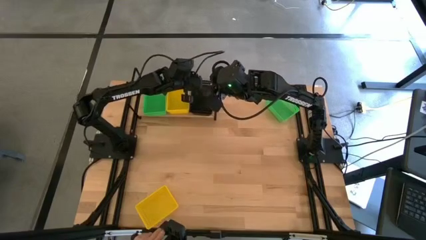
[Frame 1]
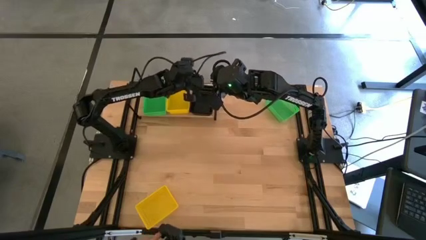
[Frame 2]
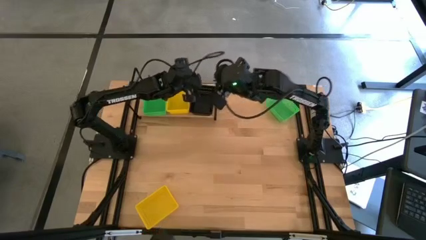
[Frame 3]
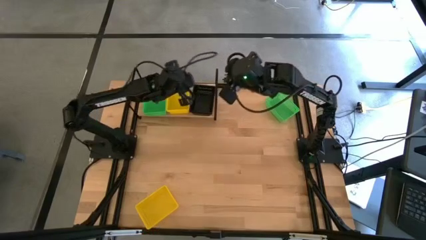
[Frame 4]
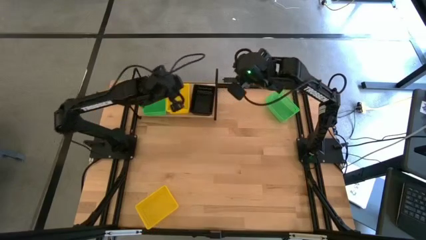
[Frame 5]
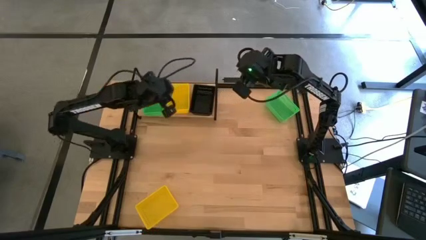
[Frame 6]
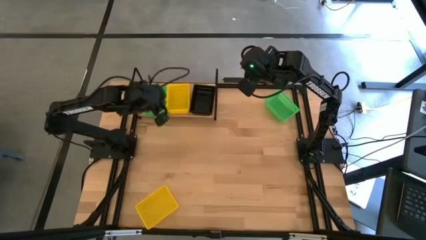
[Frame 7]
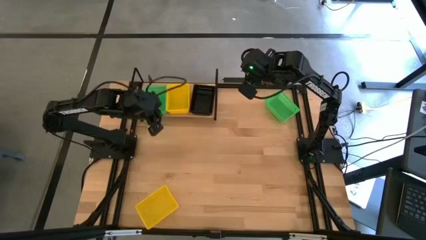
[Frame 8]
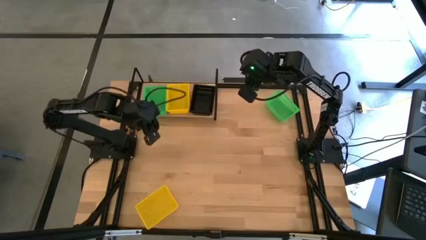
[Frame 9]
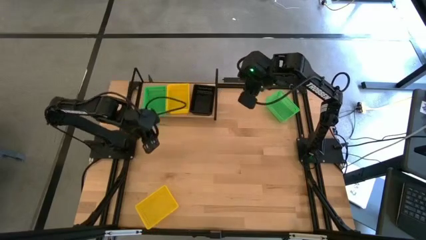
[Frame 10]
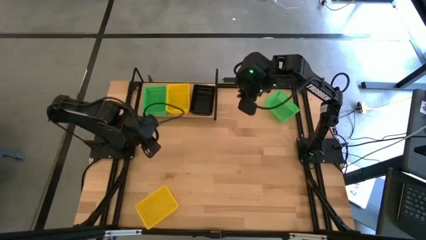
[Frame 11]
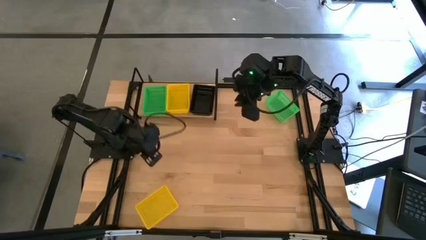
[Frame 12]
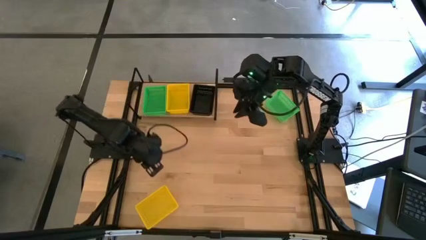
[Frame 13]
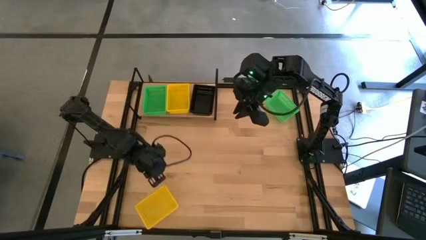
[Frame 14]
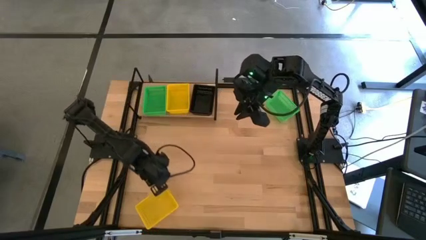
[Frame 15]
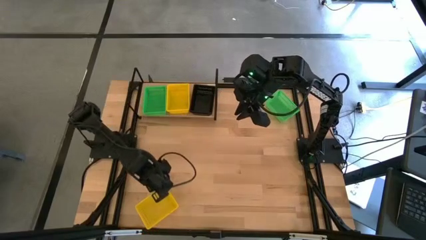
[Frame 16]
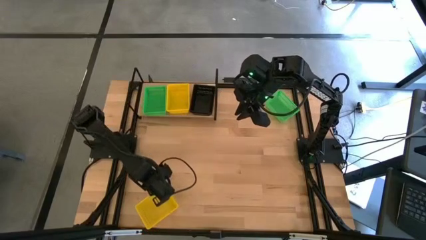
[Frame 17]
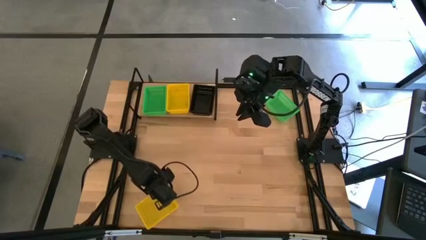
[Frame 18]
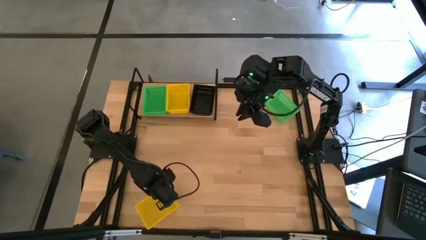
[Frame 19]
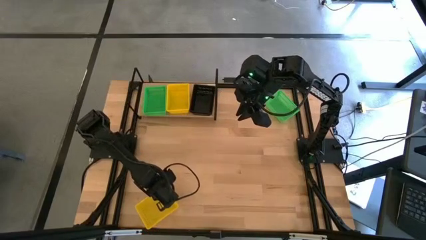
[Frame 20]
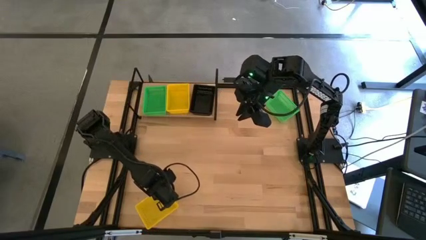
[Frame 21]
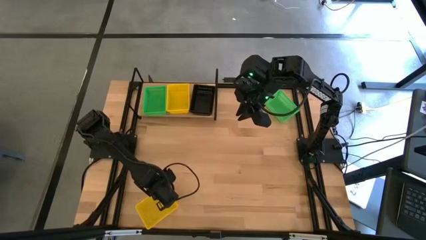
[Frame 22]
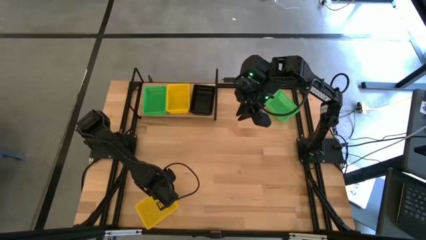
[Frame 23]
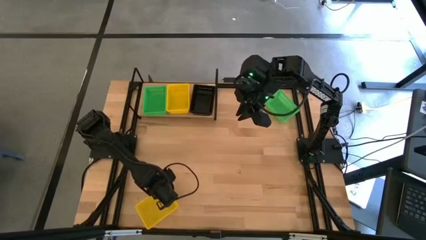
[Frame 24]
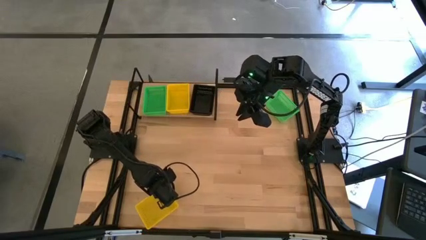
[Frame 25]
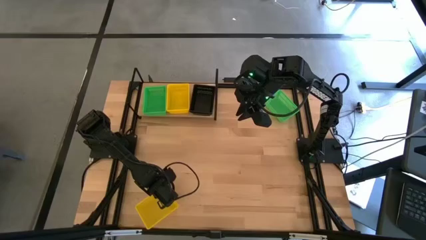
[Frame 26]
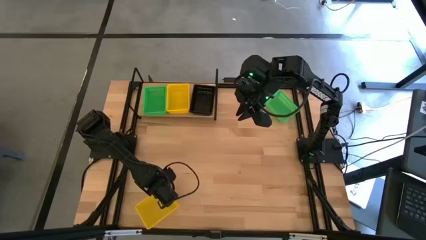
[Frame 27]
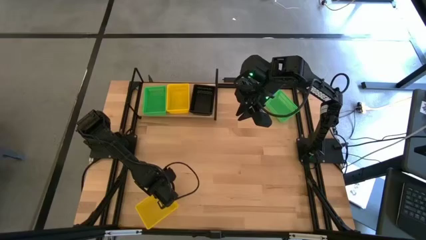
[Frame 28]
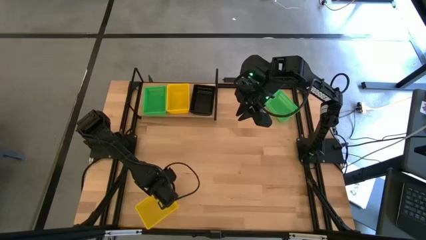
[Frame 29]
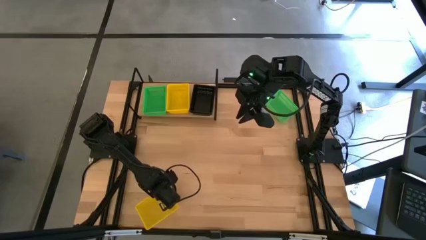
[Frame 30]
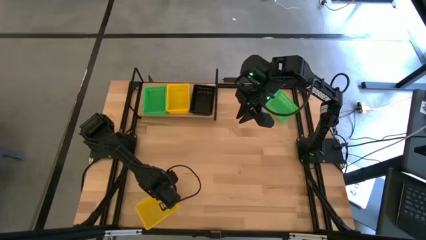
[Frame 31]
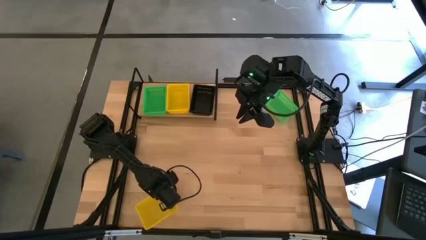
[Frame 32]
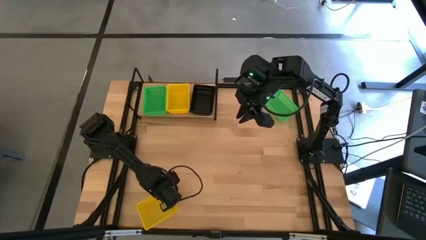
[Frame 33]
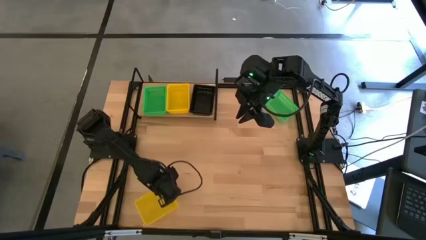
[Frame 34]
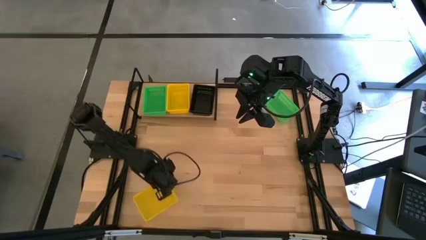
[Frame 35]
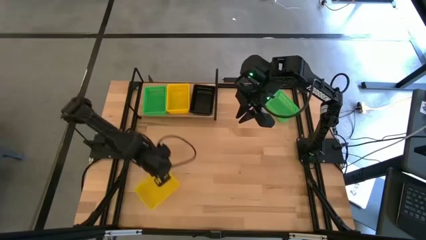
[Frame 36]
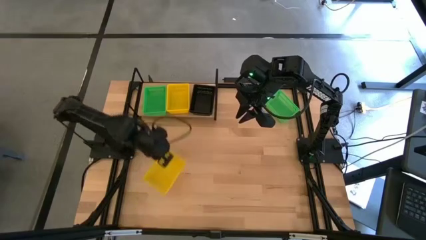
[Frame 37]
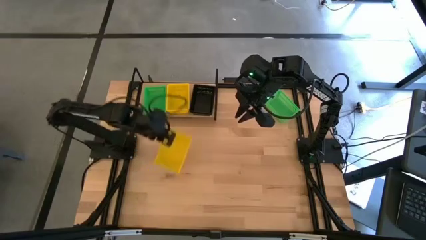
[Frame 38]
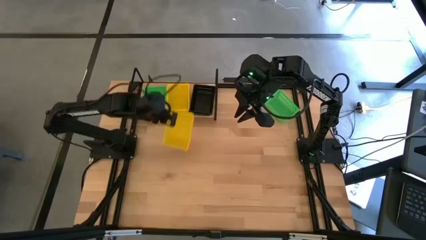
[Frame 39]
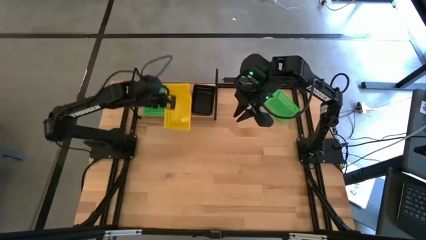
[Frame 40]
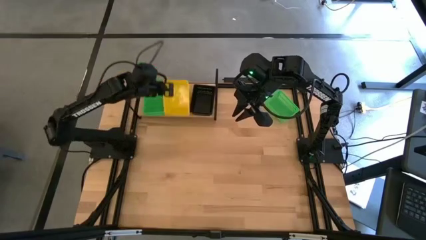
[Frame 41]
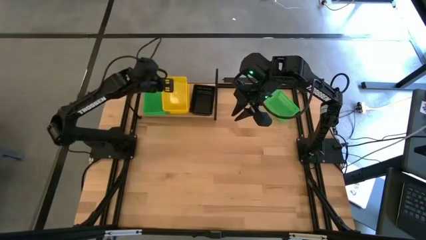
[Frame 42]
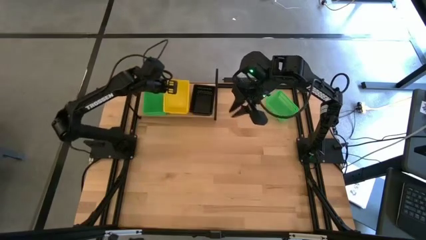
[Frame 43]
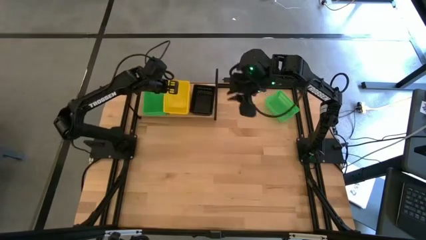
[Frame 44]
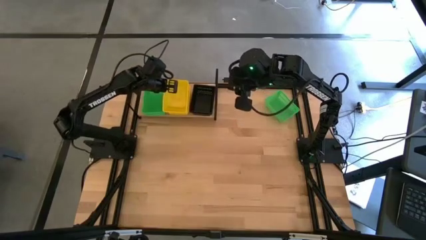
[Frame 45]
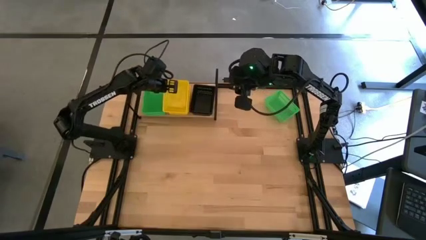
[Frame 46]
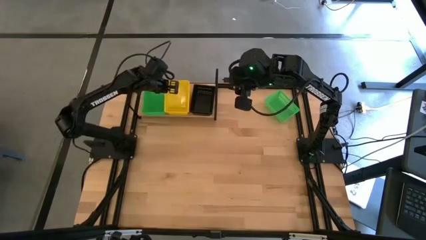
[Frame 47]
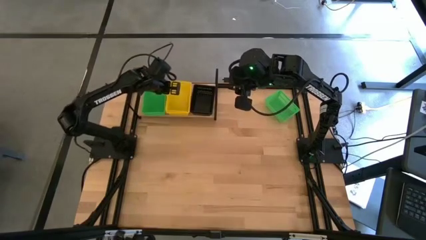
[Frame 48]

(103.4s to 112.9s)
Task: Stack baskets on shelf by color
Stack the yellow basket on the yellow basket on the shelf

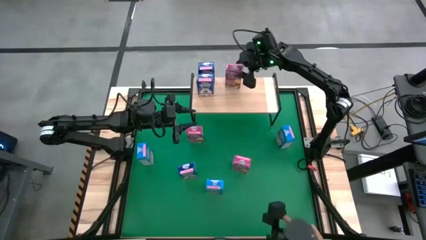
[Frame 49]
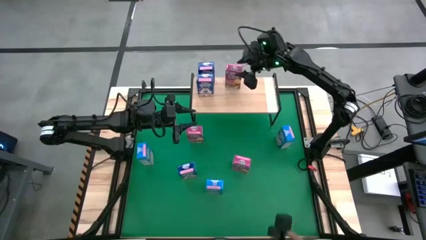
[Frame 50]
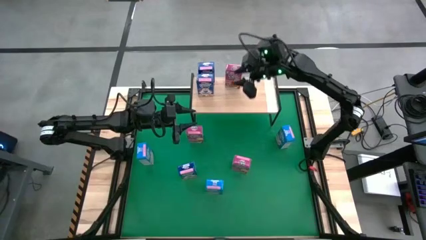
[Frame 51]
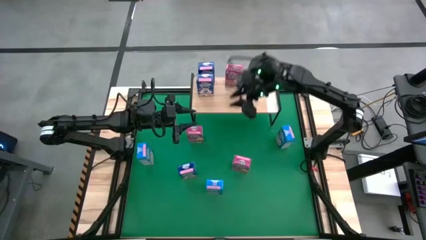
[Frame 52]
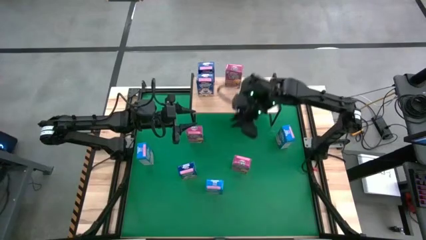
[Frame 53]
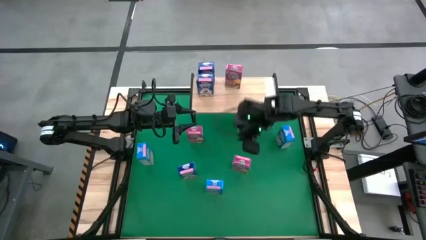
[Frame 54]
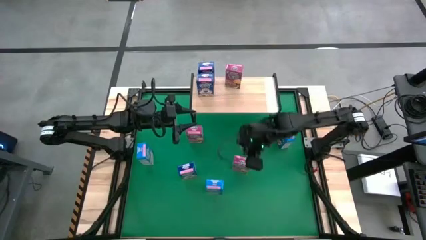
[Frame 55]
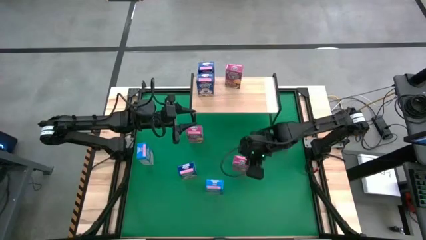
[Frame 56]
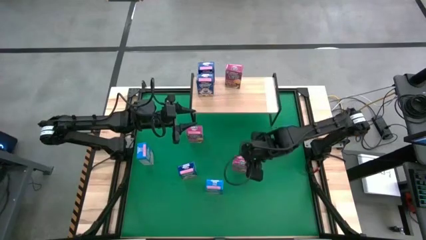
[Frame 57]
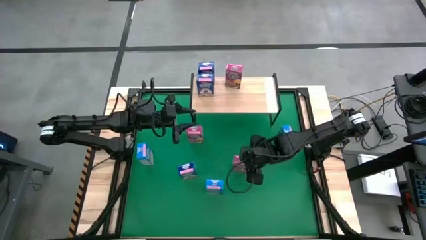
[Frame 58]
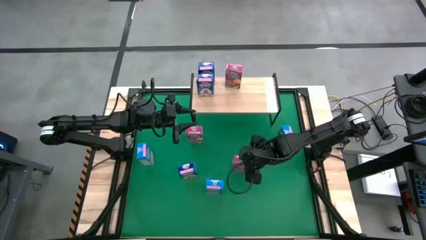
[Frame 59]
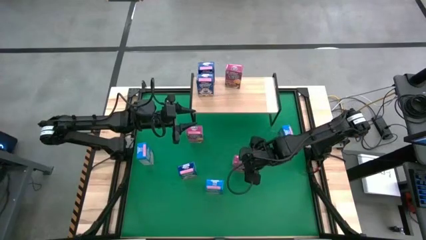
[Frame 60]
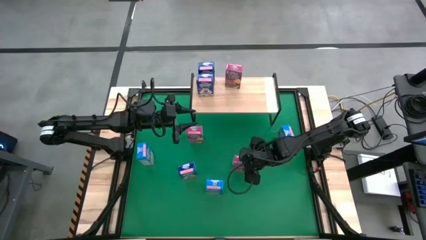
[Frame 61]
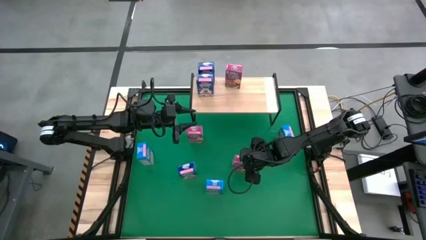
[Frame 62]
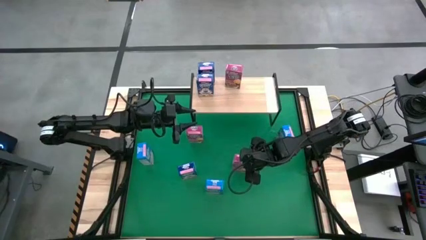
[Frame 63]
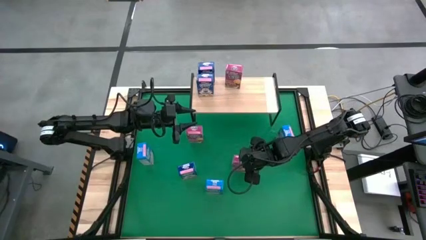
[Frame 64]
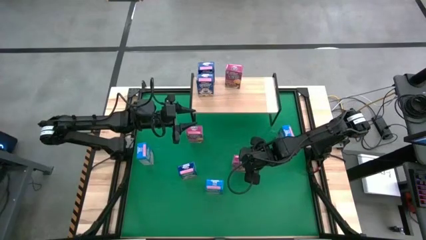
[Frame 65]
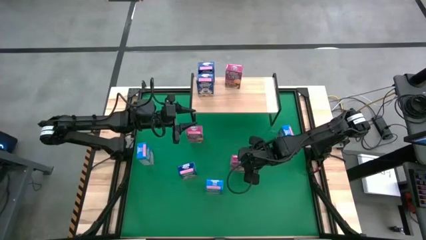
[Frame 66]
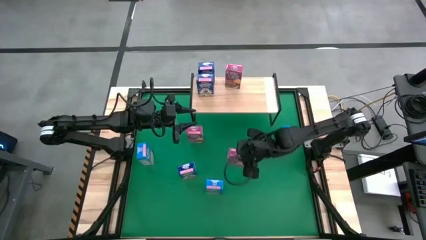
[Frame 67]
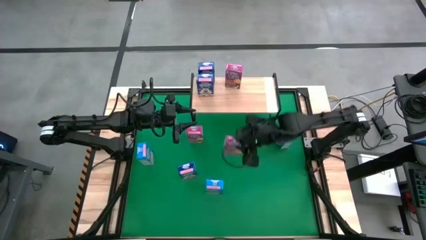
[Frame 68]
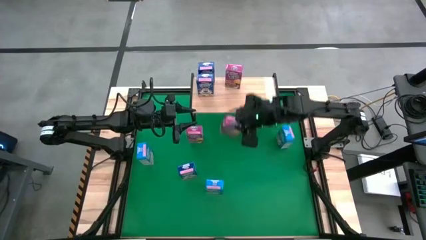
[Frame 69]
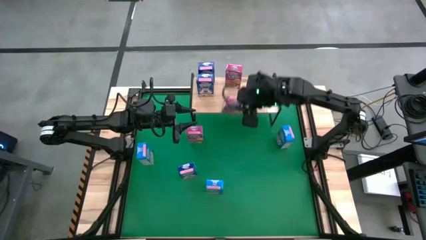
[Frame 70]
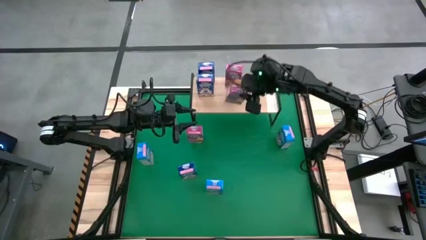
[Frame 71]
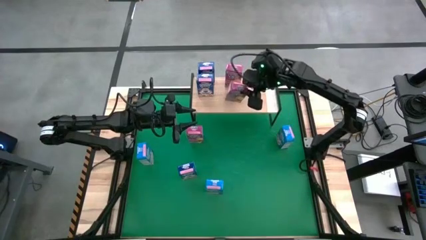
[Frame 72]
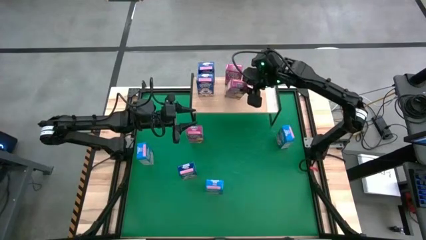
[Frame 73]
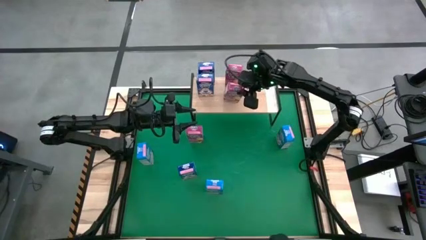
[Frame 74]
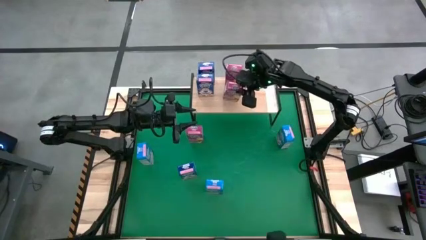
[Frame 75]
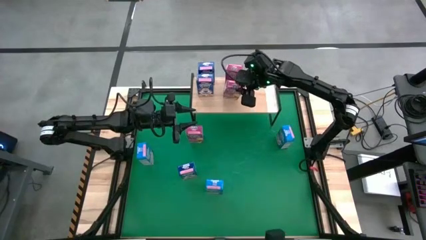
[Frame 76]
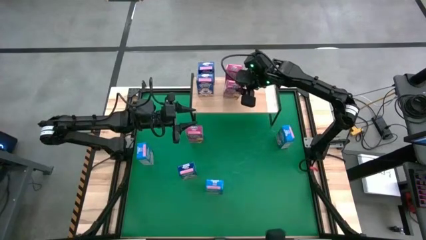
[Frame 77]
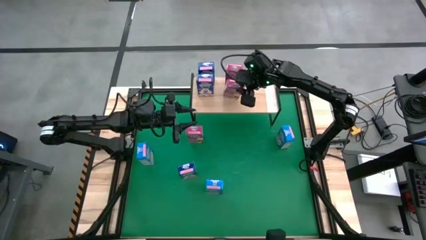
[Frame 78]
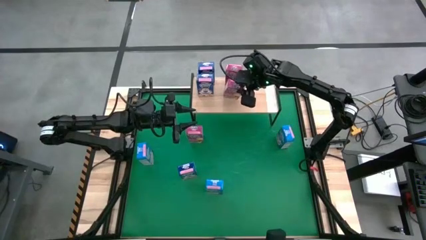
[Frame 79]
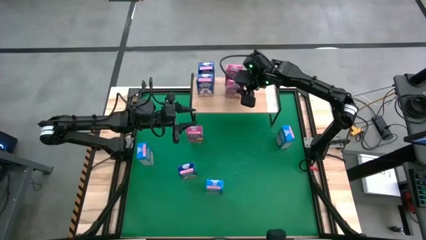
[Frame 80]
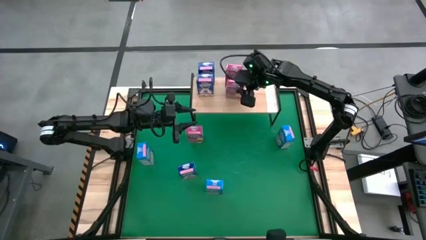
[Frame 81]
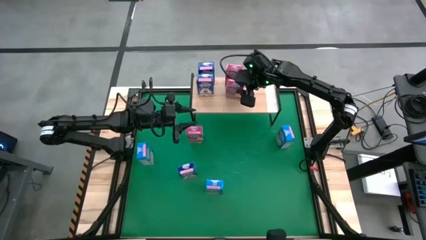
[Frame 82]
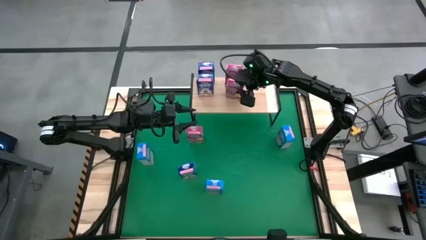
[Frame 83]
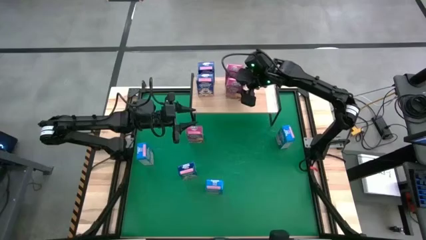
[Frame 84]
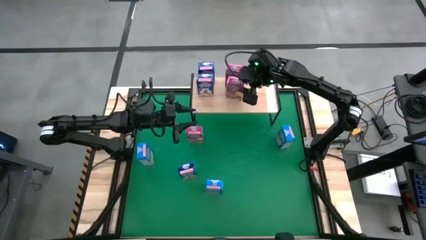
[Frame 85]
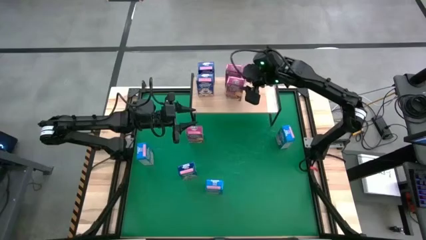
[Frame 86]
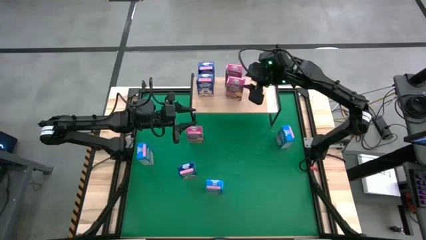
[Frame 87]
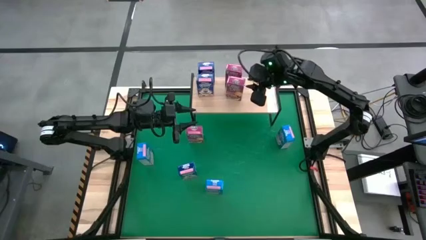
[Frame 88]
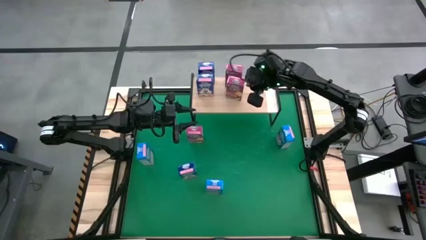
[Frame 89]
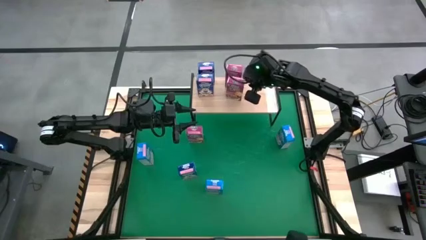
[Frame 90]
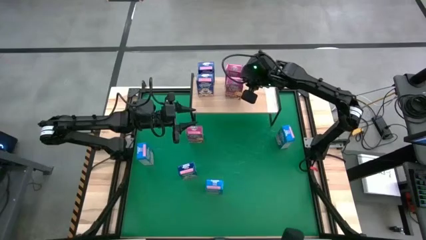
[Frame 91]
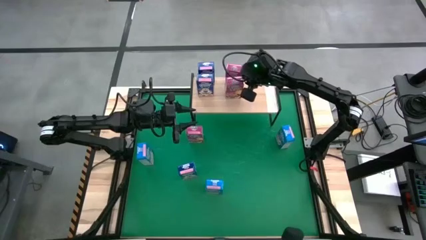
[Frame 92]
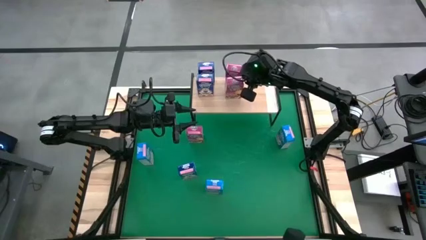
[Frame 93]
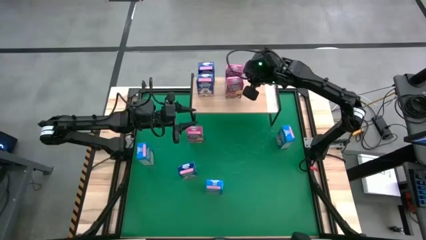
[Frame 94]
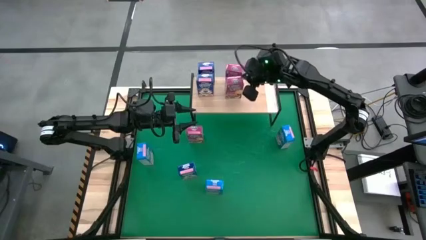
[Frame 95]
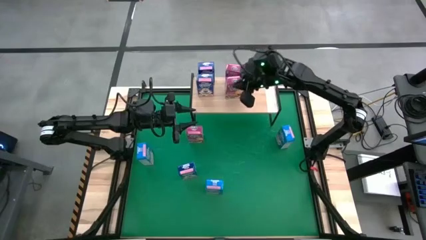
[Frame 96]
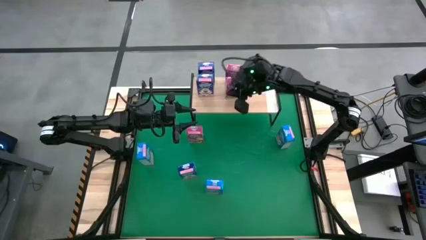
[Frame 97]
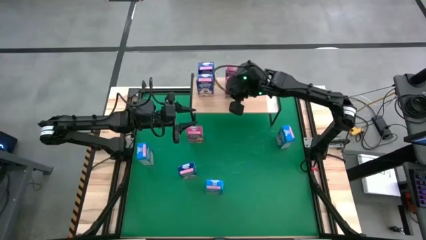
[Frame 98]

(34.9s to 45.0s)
Task: Stack cereal on shelf
Put the right pink cereal box on the shelf aligned with the other pink cereal box
